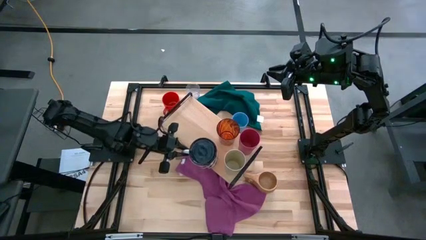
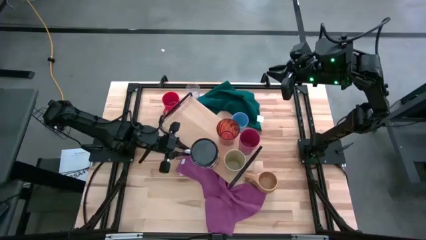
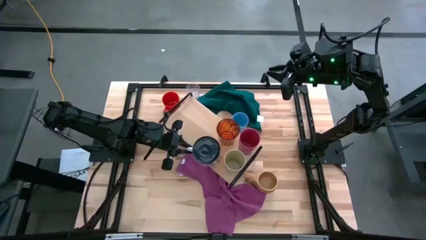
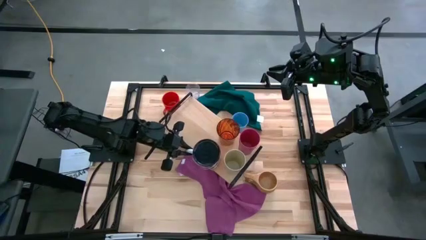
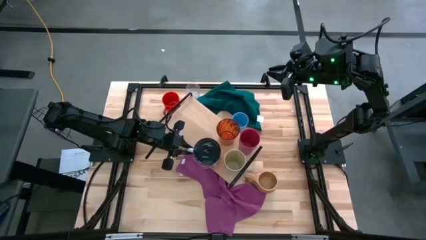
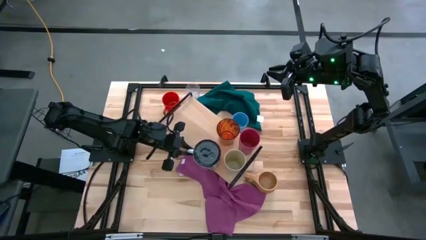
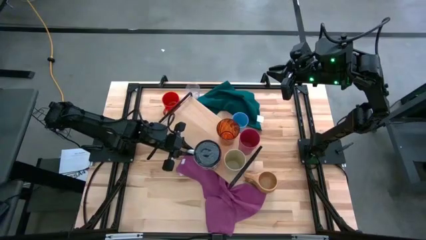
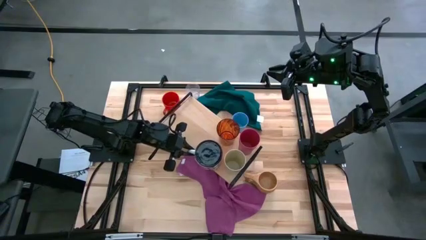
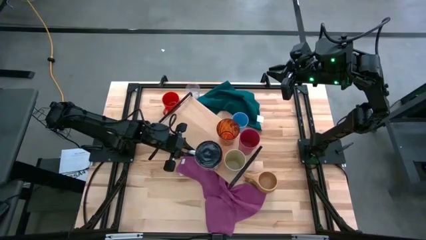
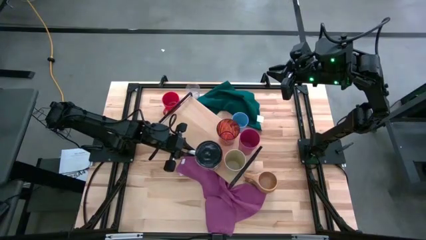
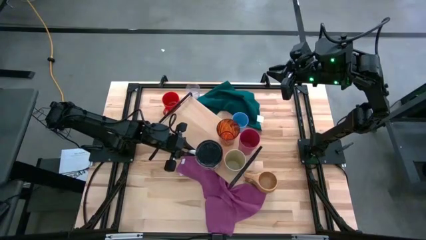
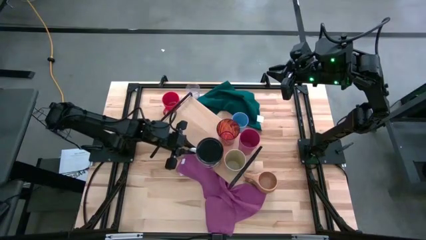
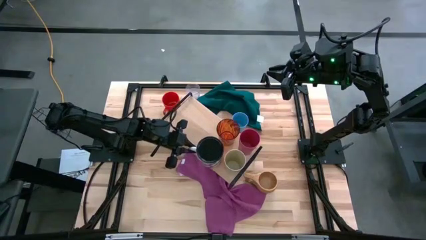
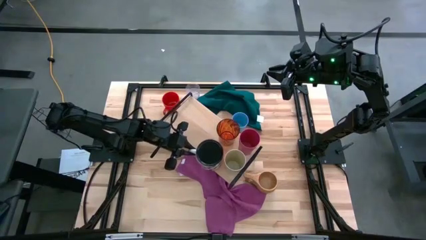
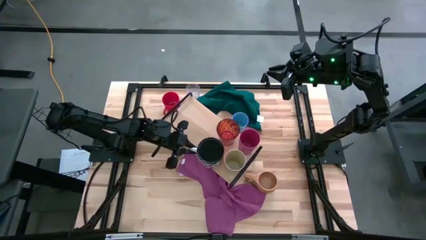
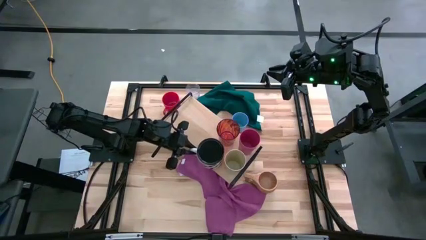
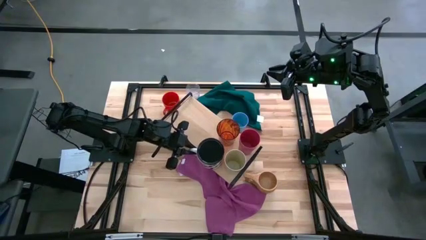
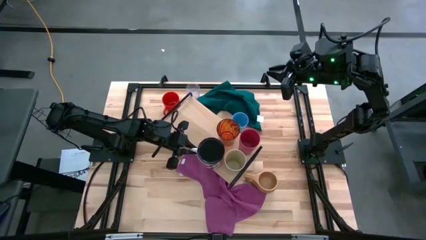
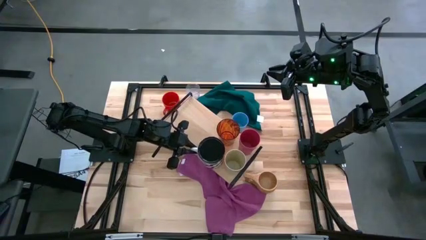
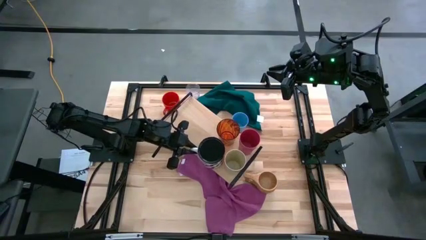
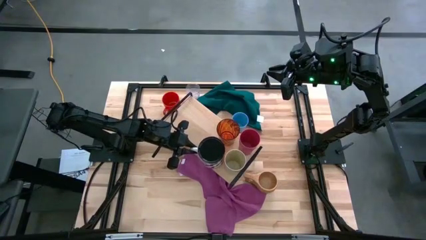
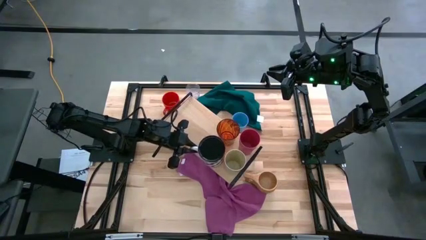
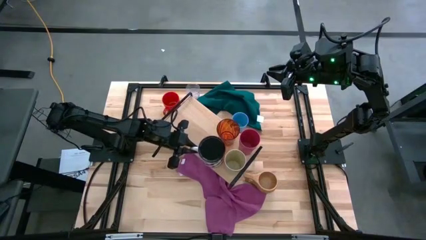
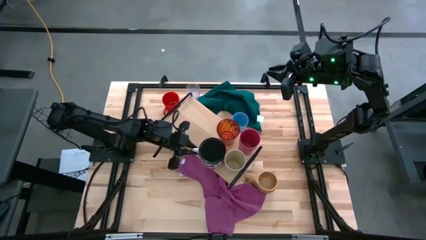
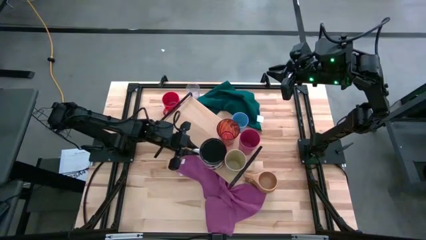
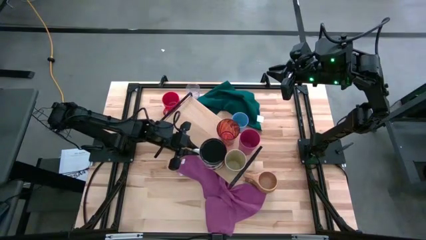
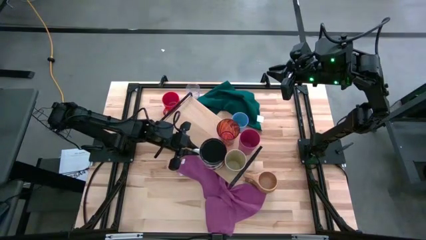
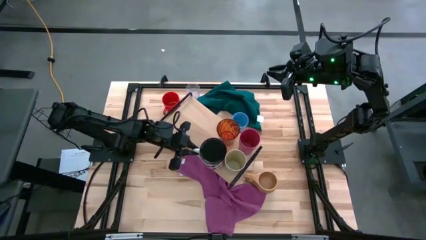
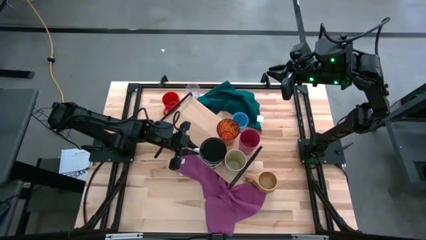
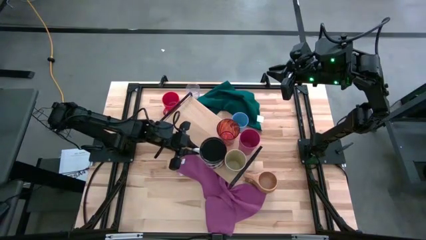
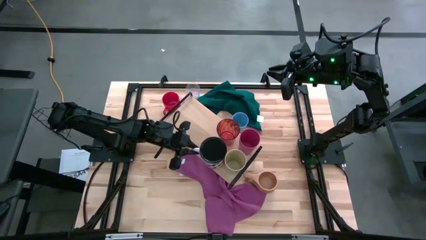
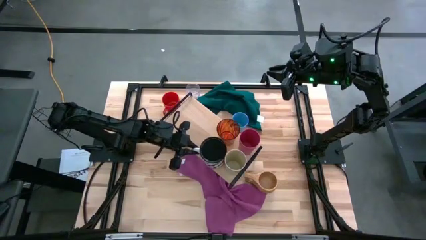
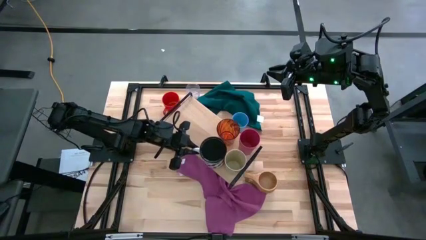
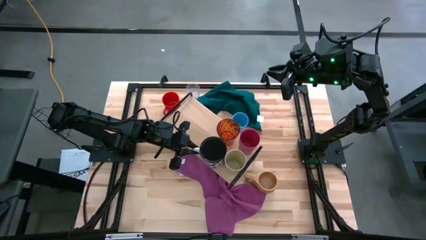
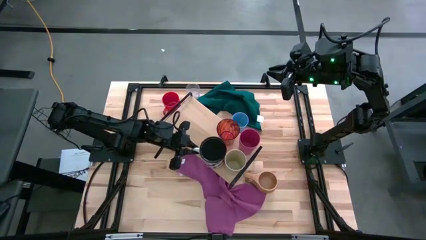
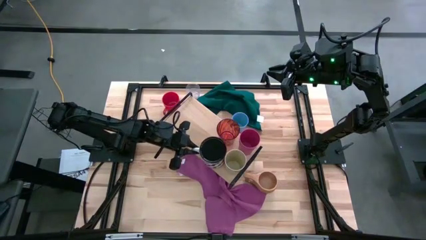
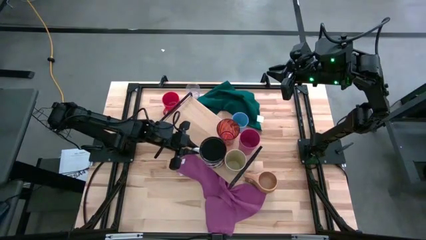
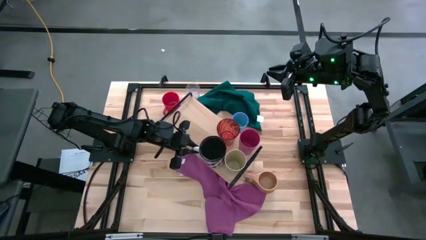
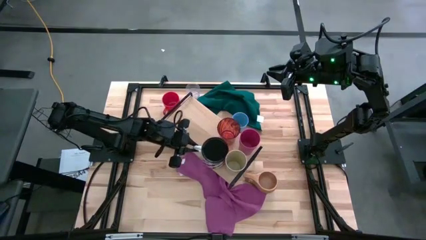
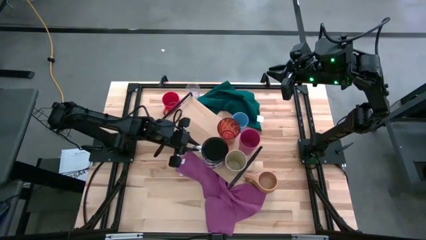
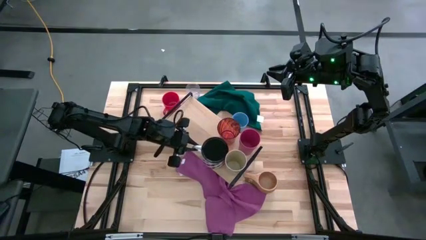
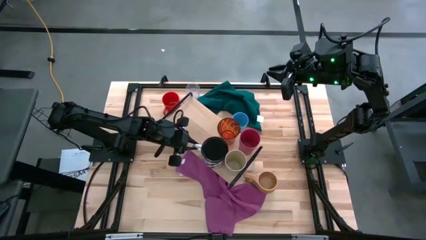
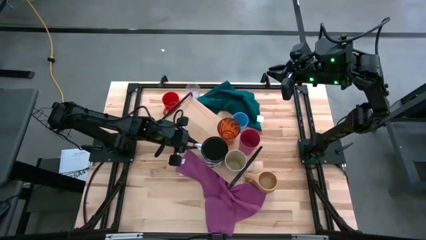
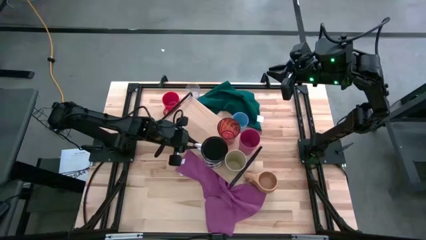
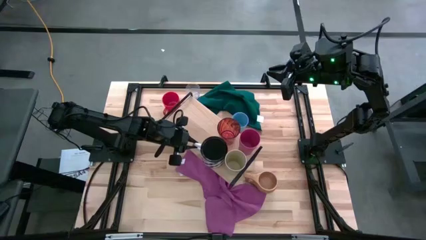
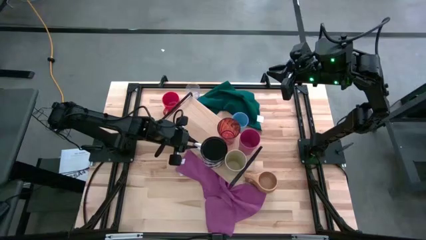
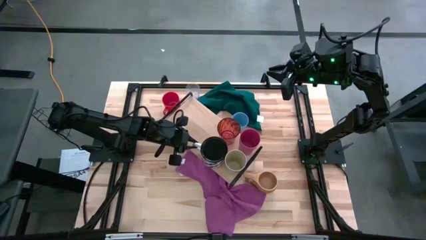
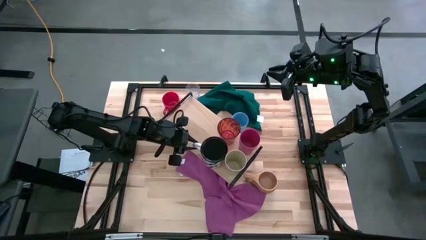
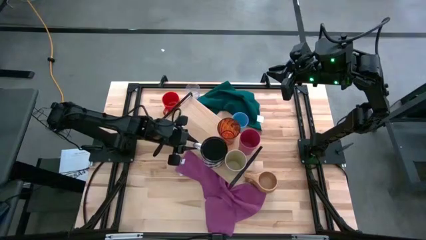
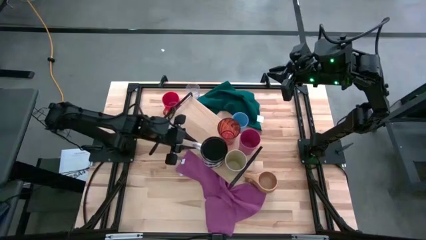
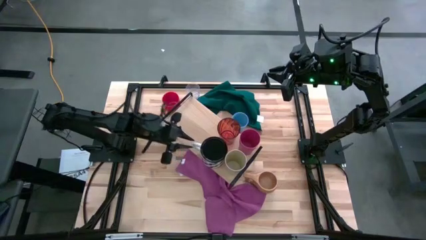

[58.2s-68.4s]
Task: Stack small to large cups/mugs on shelf
Put the white mug on the shelf

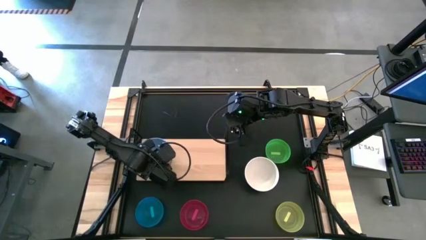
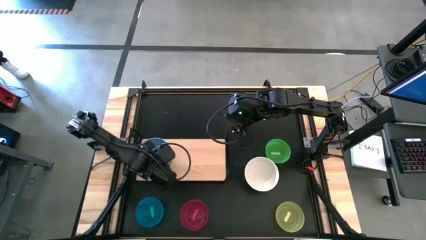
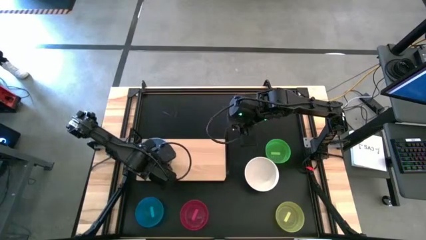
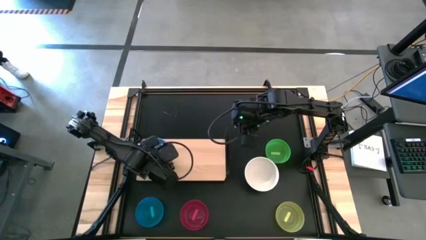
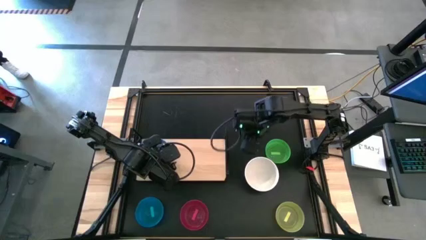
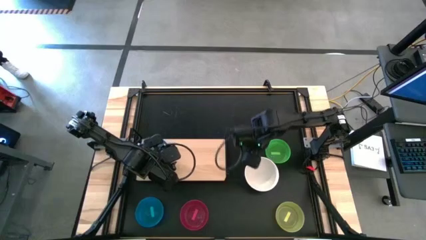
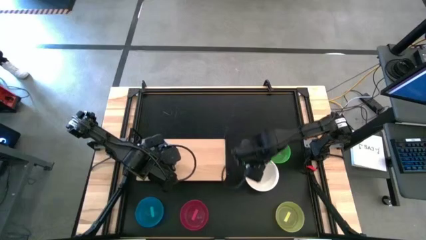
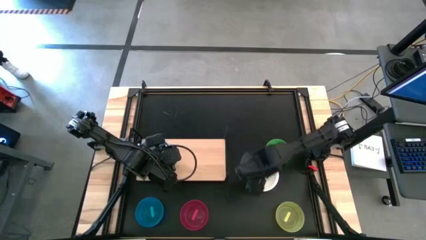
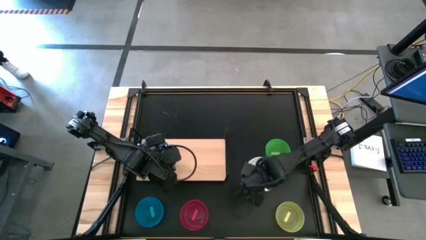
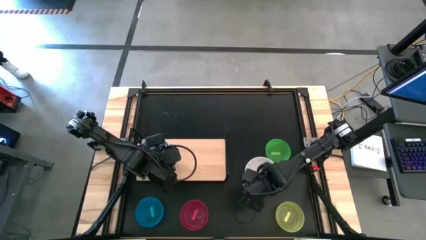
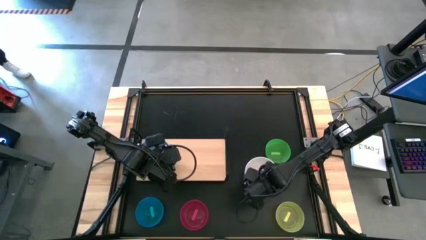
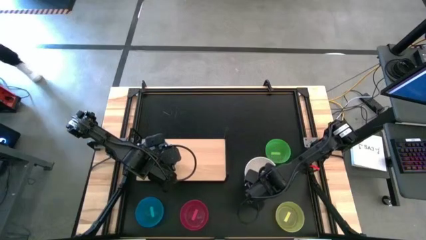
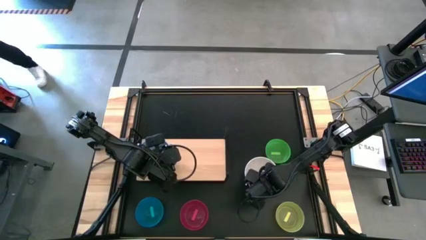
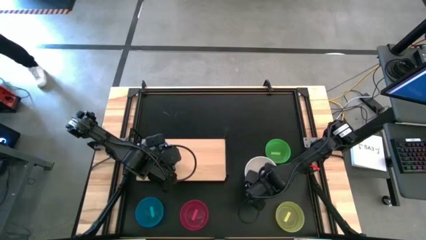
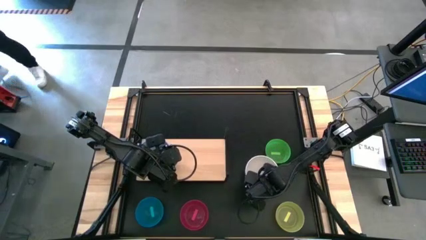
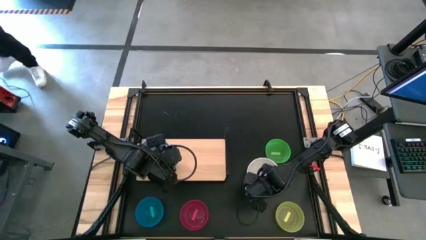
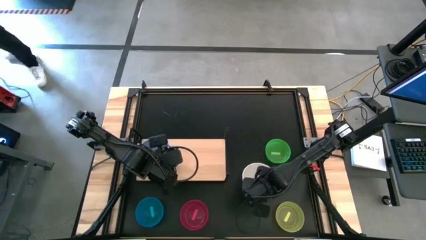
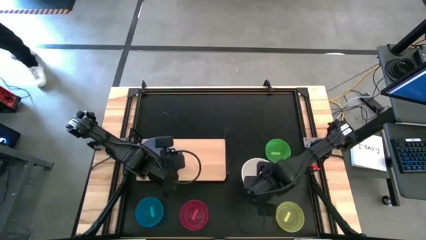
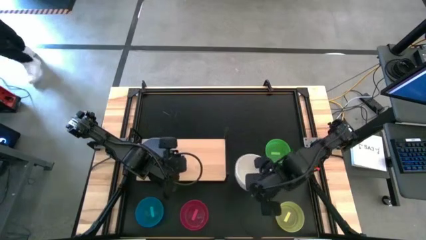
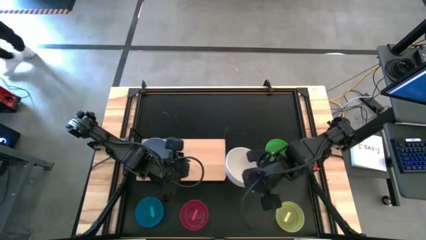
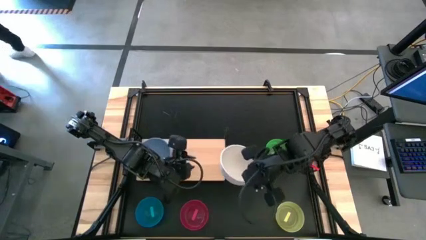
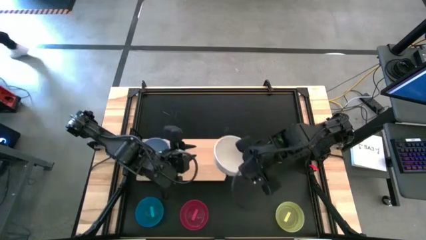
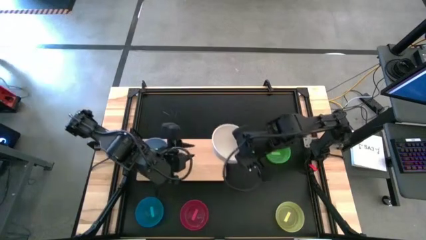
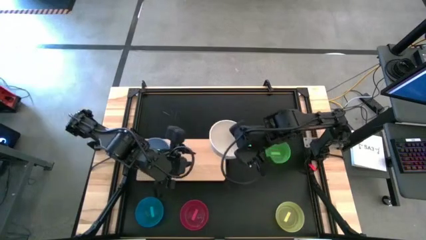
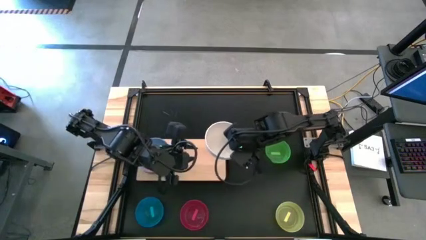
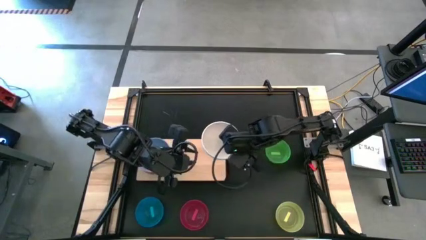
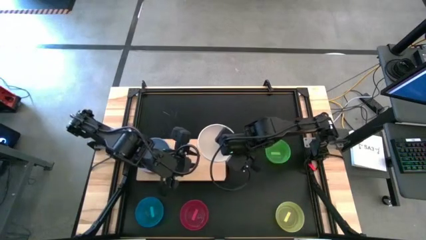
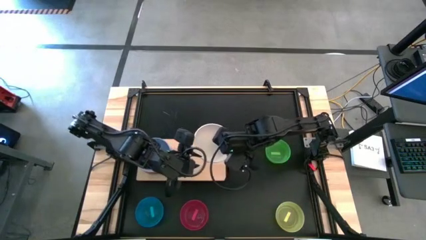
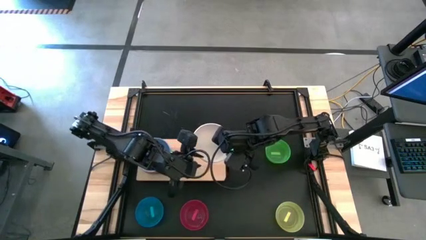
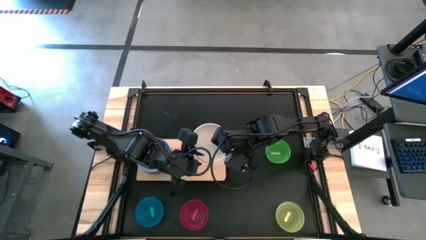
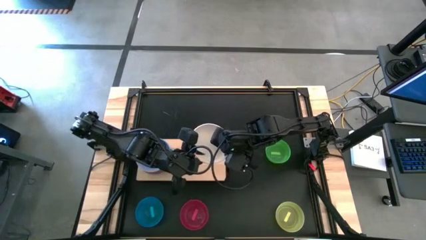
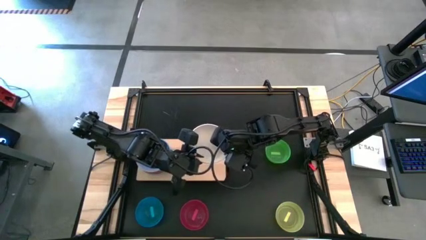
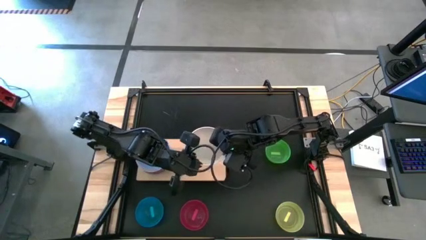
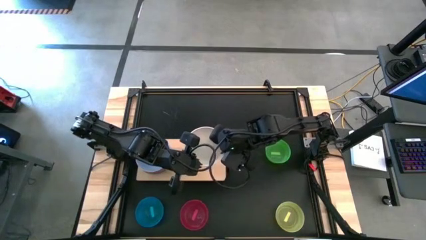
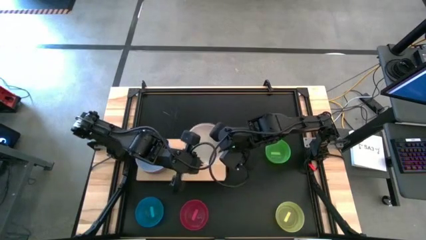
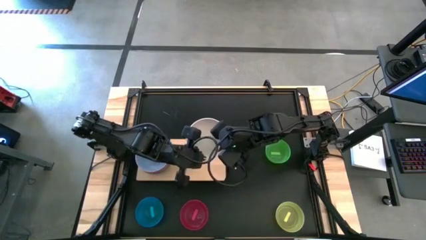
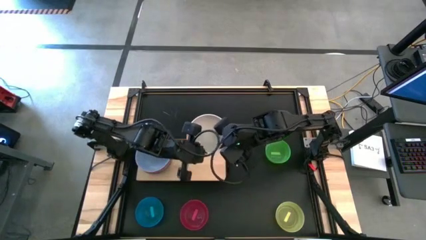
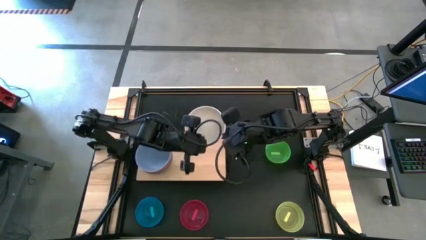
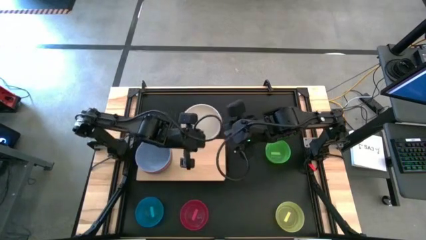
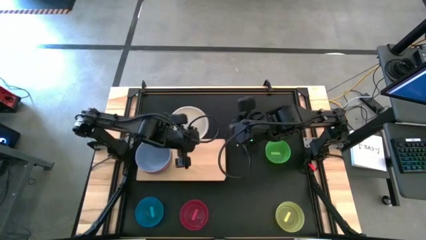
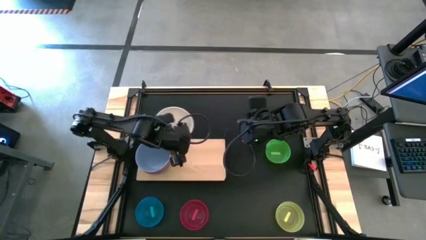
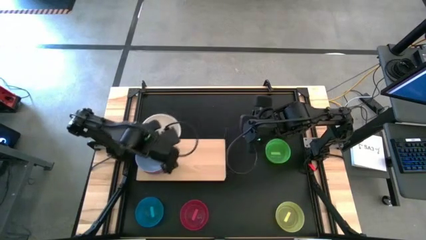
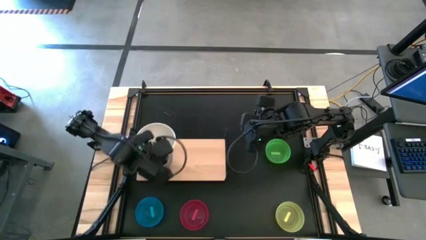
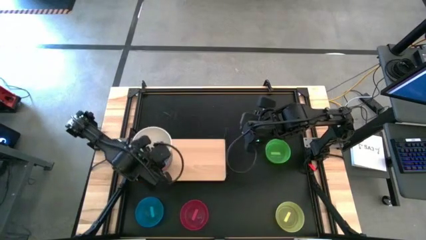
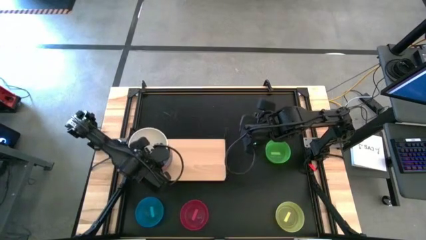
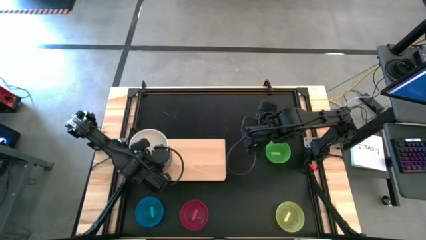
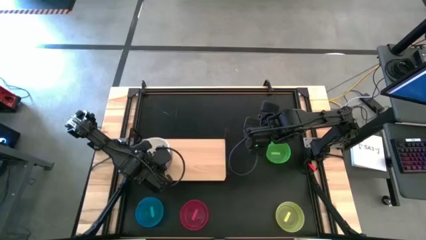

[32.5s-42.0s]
Task: Place and stack bowls onto a shelf
Stack the white bowl on top of the blue bowl on the shelf
